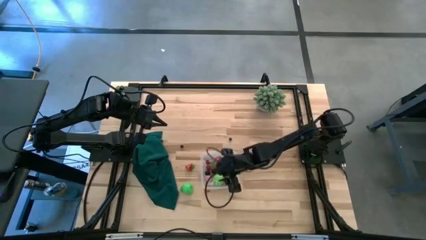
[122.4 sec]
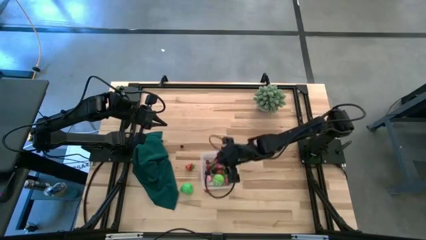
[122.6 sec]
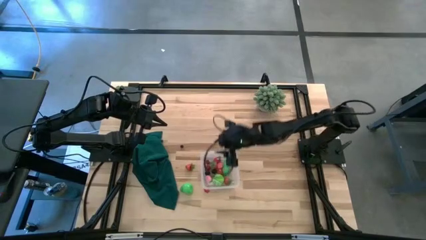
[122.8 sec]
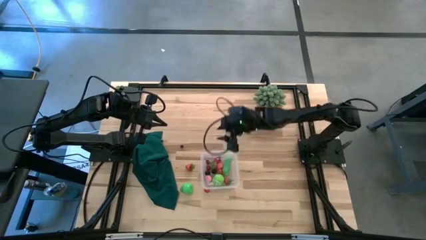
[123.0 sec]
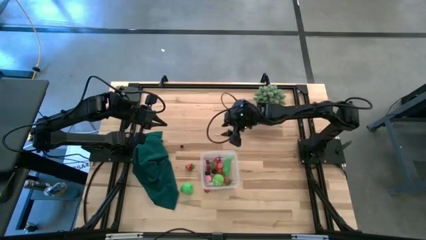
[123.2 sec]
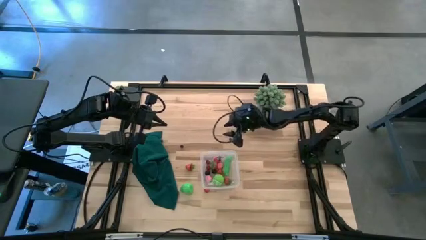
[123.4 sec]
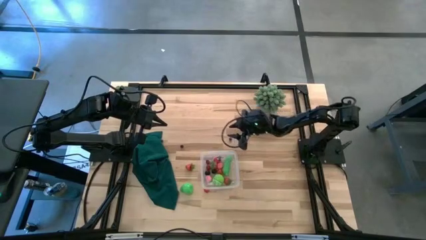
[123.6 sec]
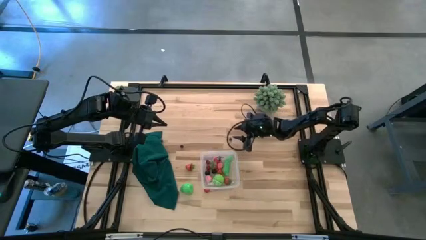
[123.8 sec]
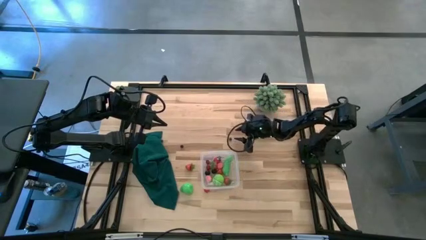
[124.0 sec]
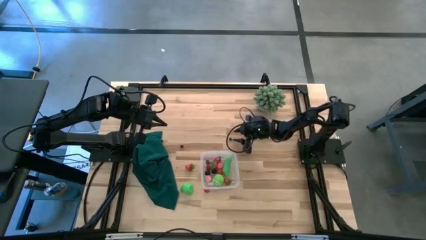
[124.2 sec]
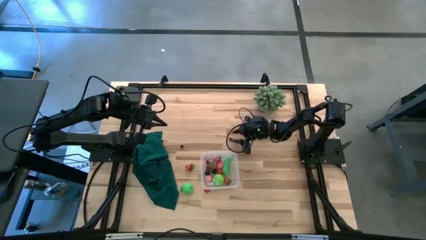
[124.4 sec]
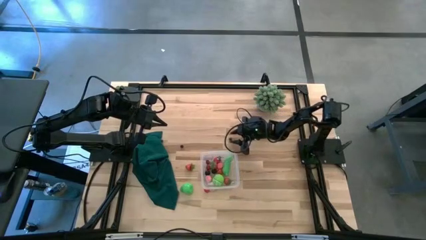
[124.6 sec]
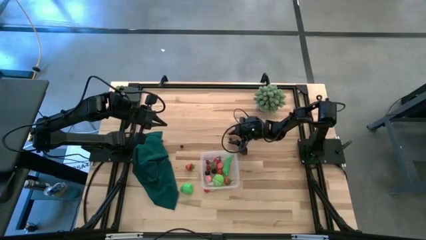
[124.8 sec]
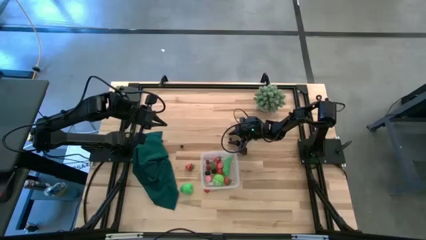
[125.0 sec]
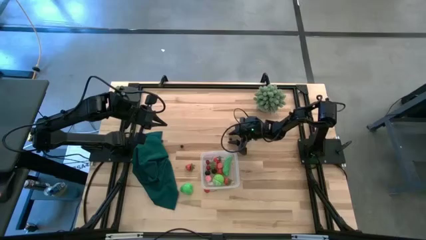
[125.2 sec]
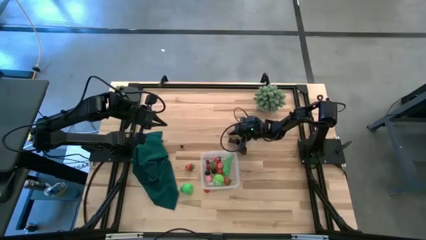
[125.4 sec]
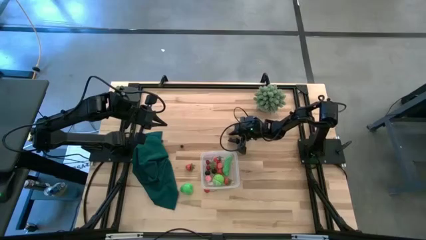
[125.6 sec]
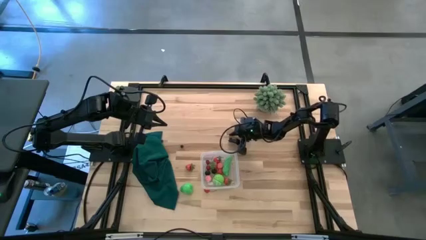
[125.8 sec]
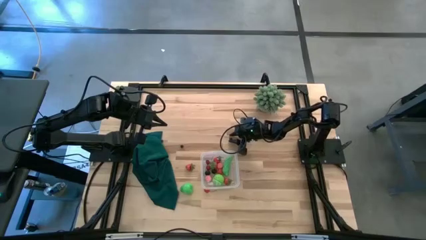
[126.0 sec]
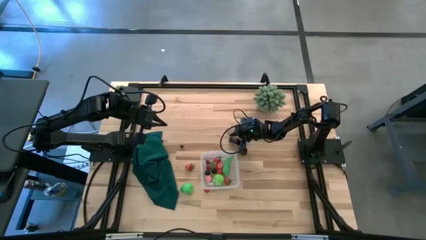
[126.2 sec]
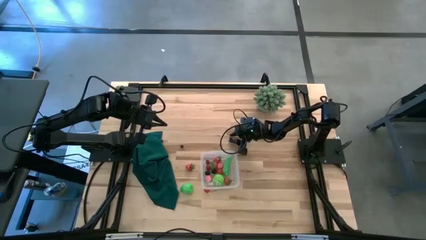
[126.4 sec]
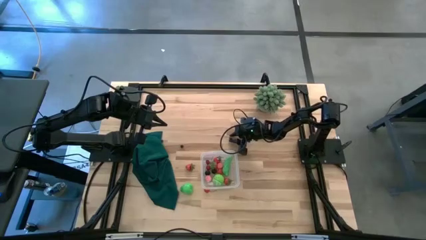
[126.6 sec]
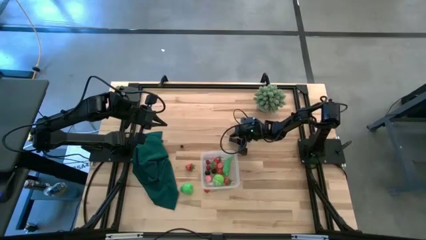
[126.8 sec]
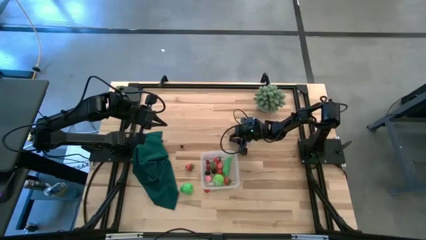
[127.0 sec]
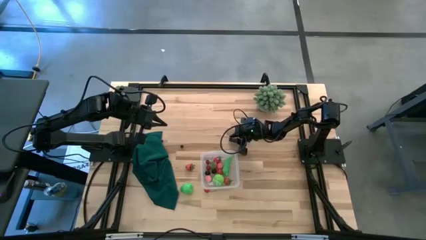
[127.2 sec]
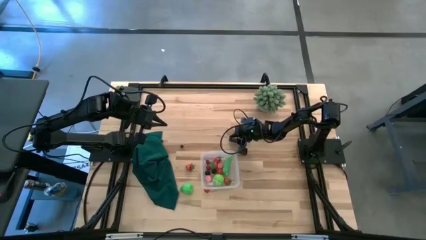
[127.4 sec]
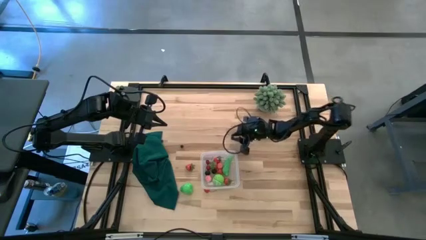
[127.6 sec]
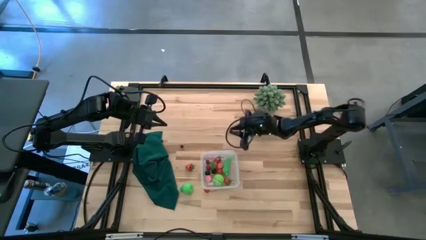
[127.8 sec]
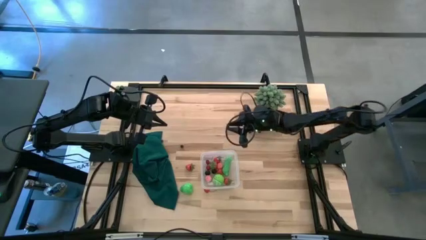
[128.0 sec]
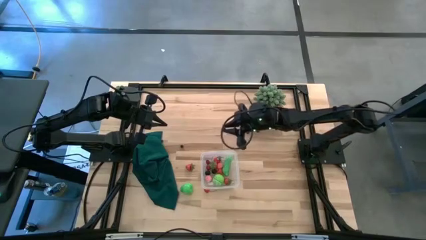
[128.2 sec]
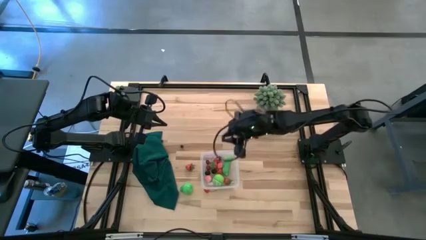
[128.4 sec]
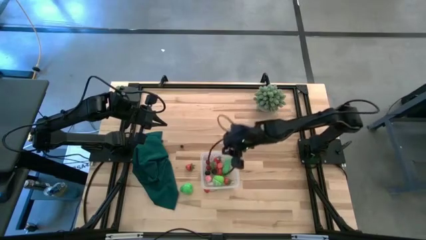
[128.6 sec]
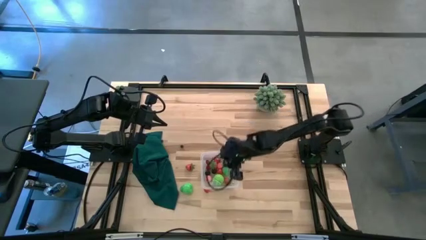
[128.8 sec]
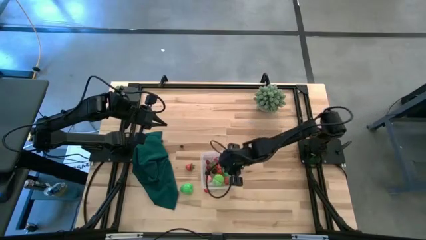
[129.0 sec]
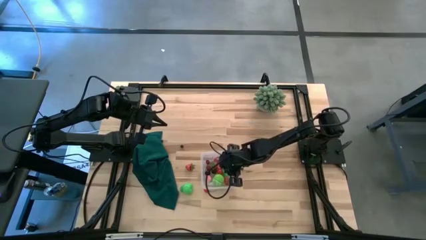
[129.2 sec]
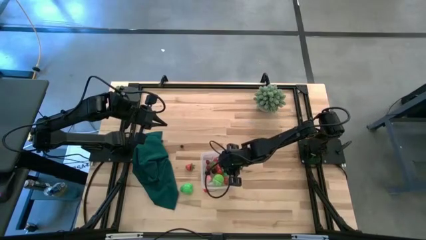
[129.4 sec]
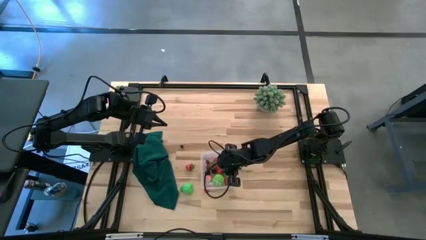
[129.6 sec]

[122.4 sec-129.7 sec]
Task: Pick and placing Produce into tupperware
Put the blueberry into the transparent bin

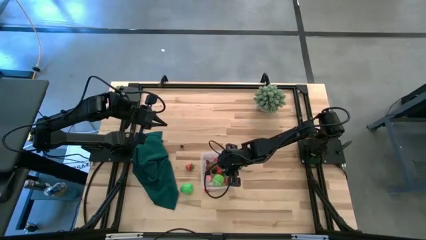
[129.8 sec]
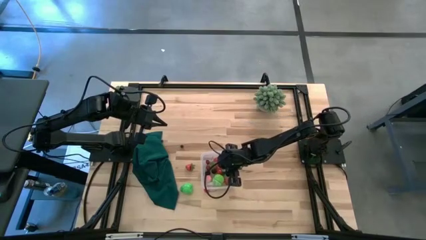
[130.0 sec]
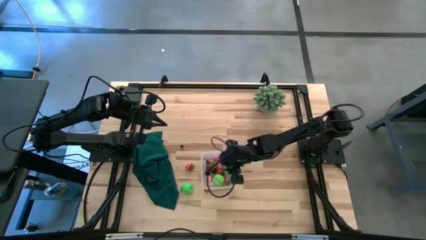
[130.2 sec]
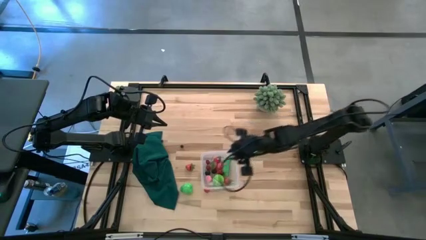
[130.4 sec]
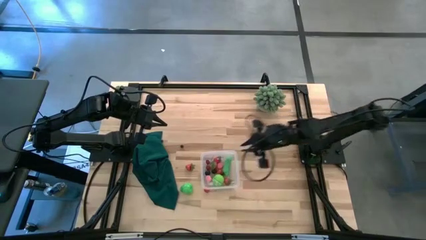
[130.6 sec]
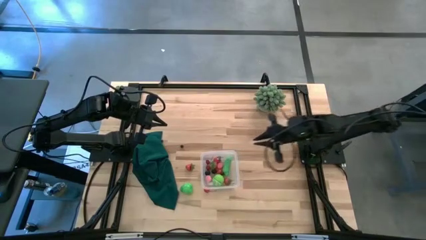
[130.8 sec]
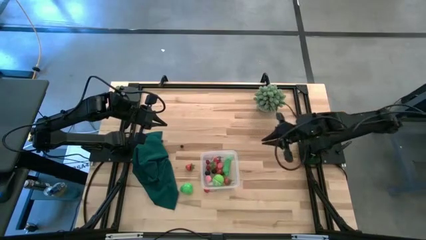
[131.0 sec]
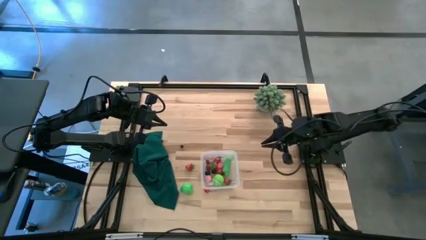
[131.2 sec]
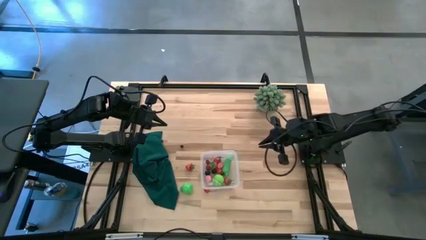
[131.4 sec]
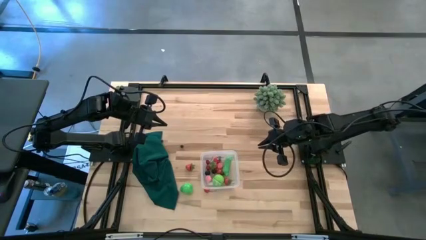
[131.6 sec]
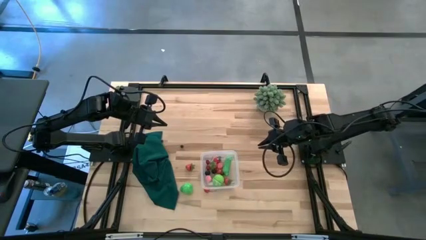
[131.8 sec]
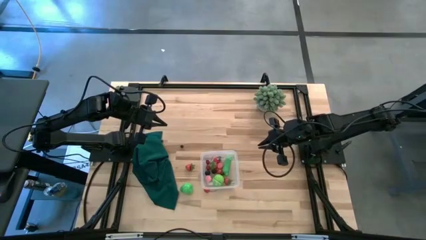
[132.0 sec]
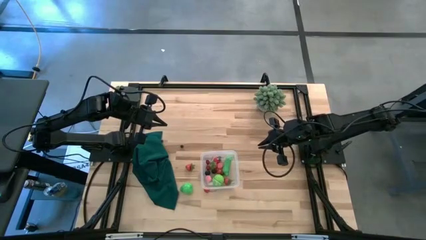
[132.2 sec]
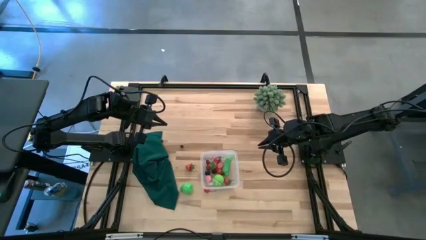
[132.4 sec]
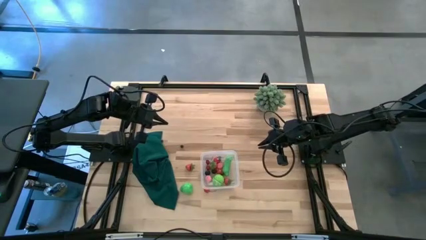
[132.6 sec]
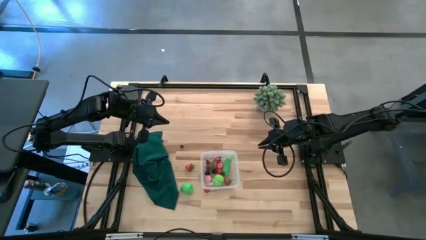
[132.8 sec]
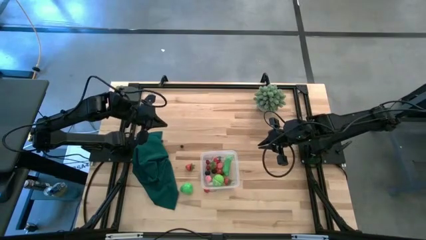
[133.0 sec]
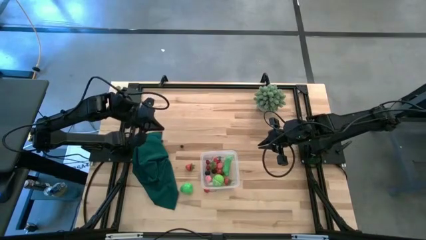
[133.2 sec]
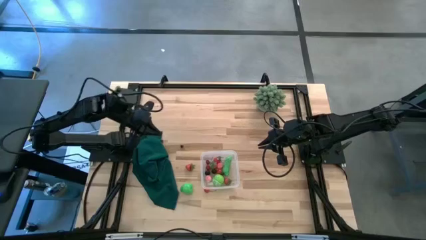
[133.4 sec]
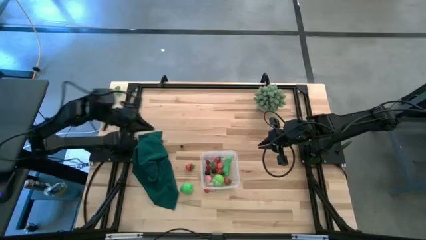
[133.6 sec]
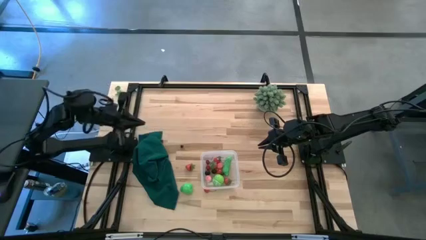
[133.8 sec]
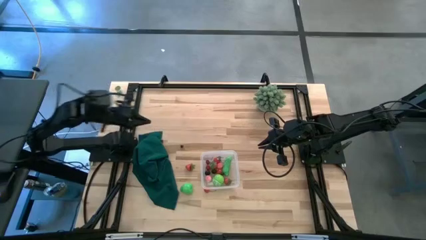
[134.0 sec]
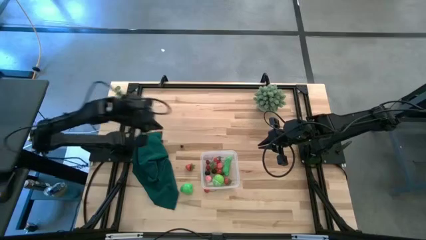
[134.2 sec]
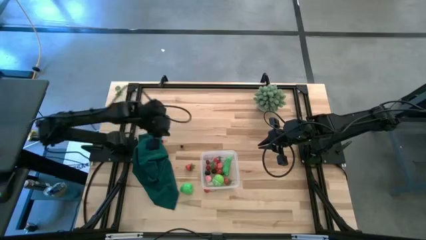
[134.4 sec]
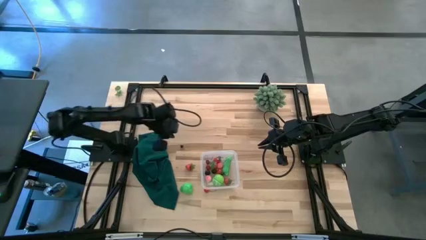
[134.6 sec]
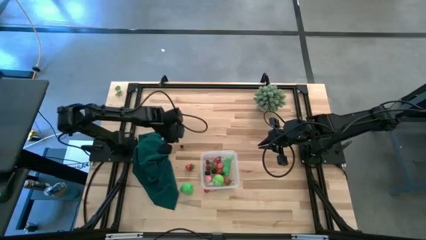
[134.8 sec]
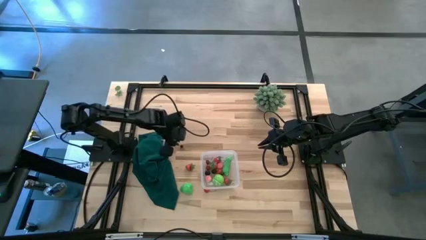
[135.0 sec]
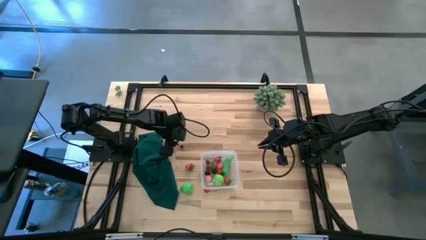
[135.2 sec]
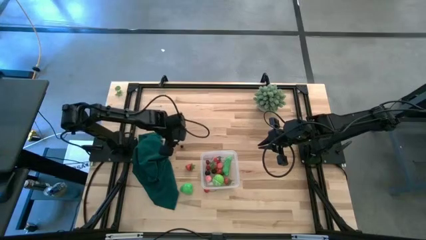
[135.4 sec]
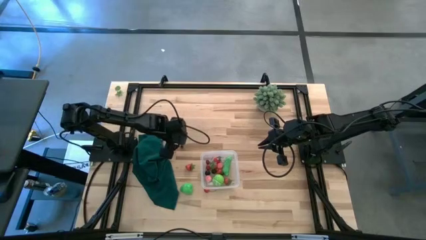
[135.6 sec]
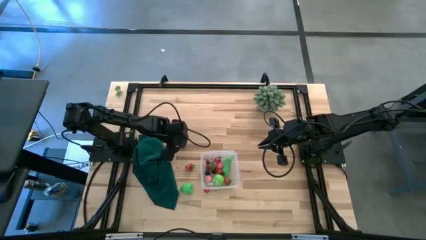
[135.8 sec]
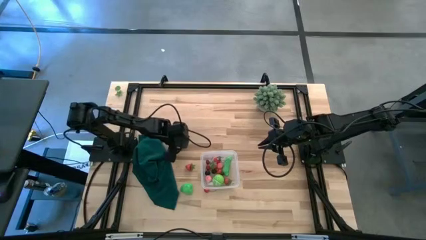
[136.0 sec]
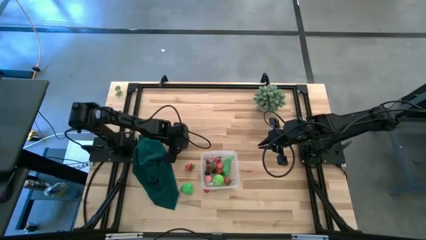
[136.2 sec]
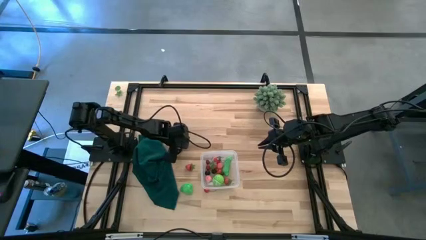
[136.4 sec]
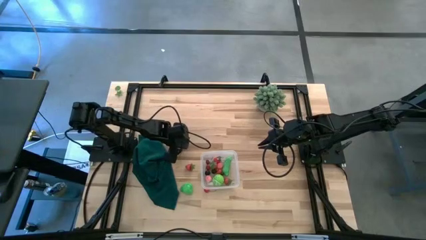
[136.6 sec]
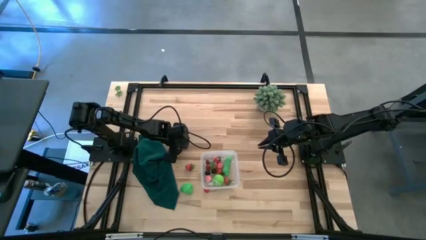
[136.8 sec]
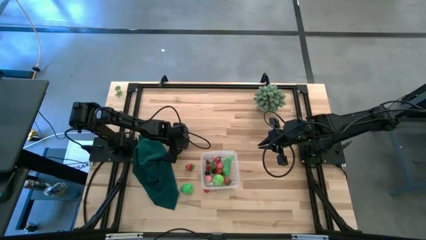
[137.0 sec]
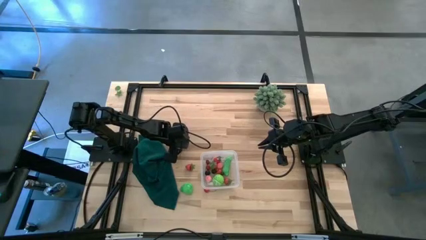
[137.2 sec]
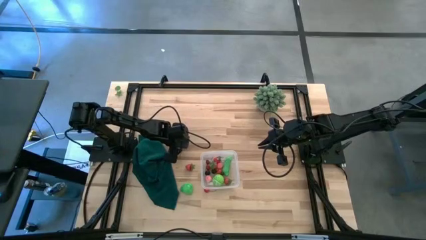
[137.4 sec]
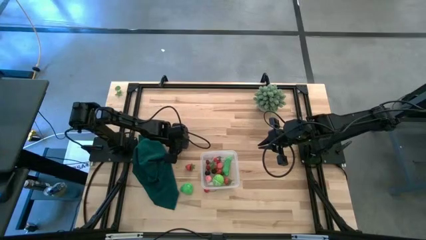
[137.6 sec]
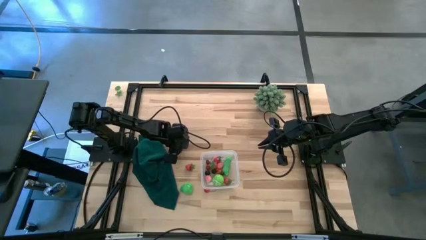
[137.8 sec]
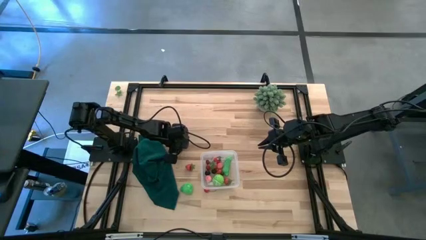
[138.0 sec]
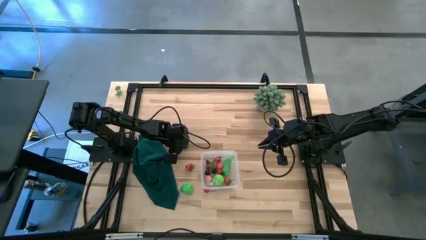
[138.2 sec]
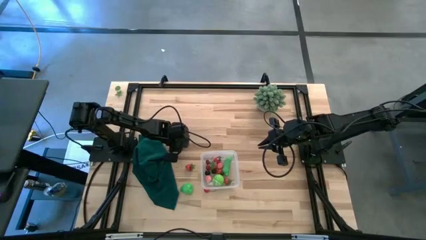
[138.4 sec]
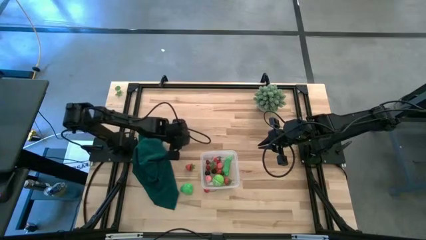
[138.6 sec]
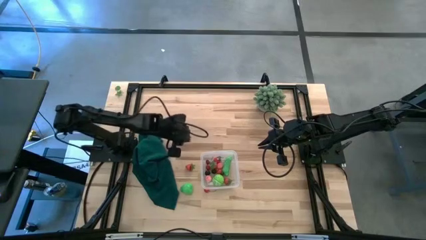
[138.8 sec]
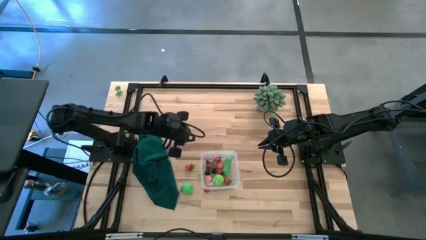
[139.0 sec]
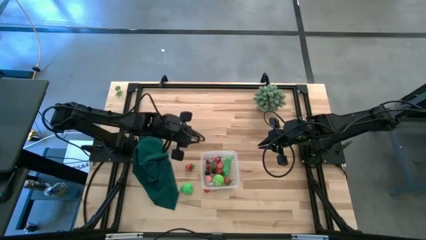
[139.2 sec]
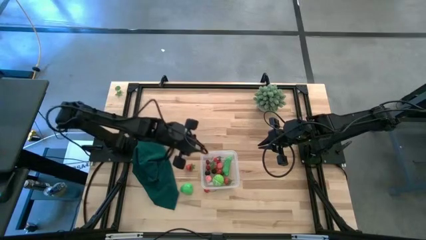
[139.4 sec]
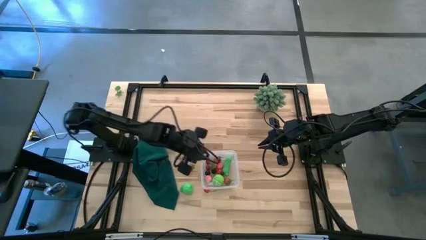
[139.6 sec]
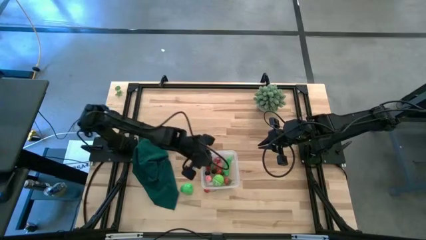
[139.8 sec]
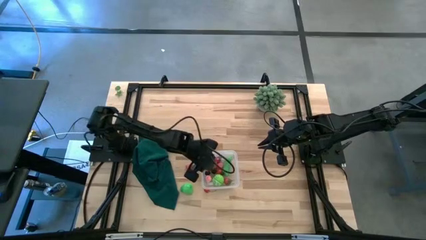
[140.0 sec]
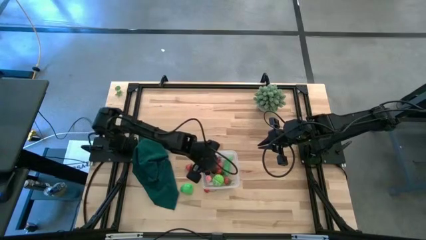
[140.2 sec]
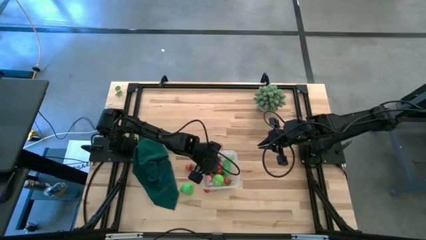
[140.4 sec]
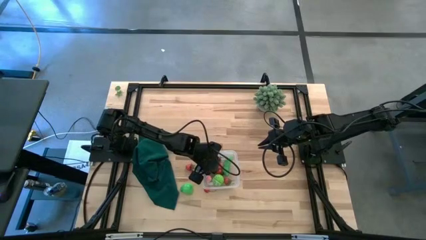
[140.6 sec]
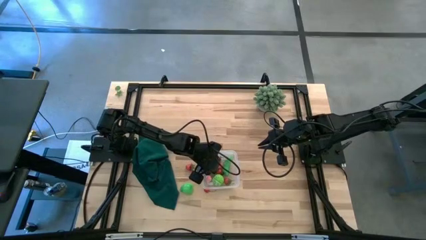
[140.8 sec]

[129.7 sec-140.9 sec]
Put the blueberry into the transparent bin
